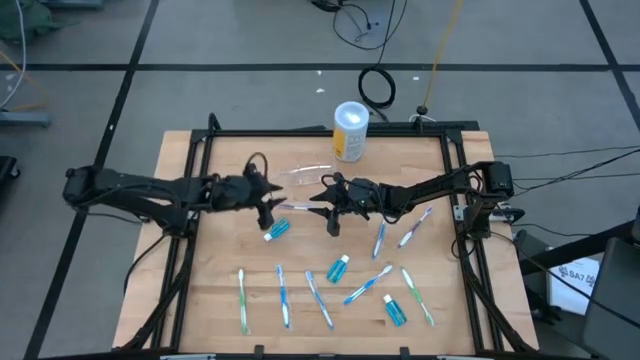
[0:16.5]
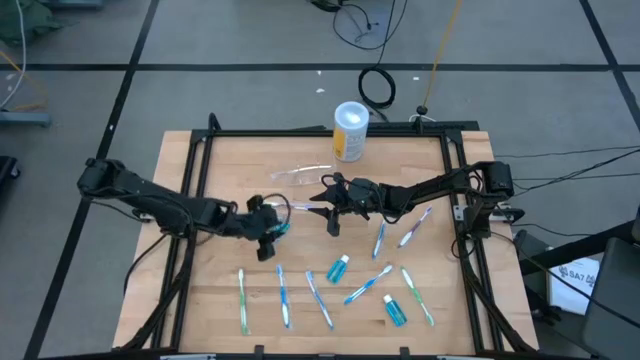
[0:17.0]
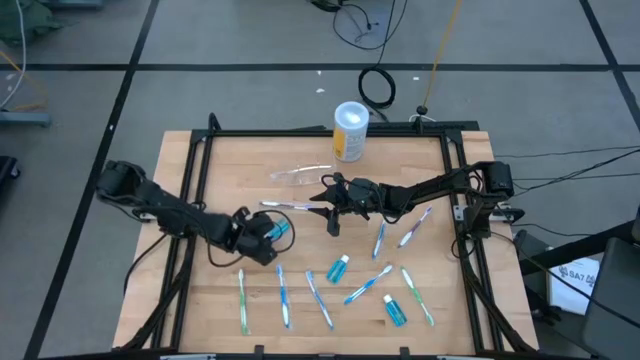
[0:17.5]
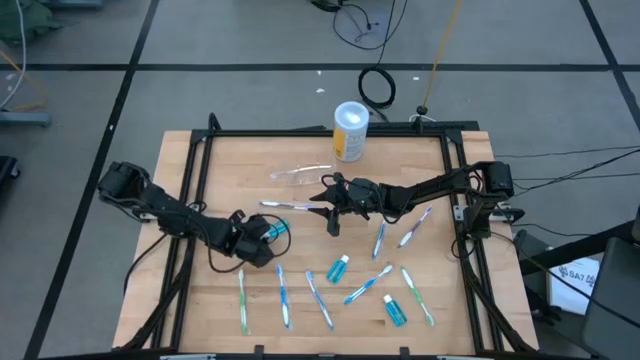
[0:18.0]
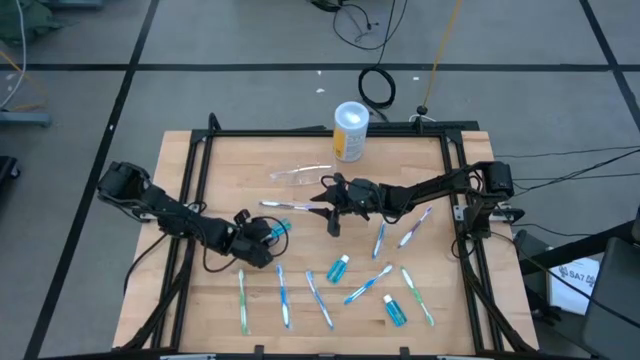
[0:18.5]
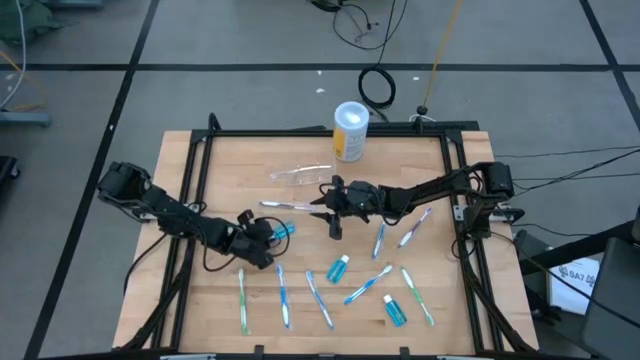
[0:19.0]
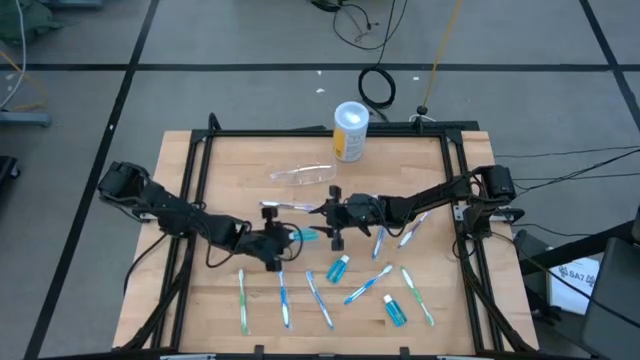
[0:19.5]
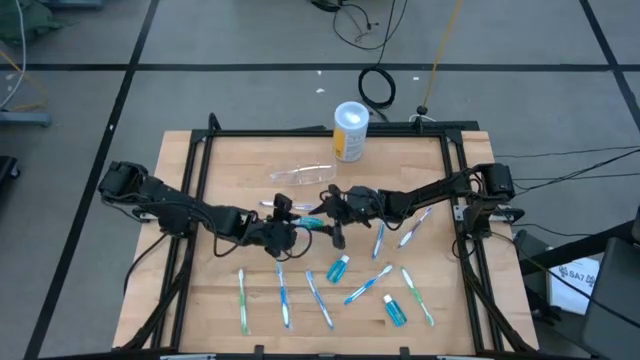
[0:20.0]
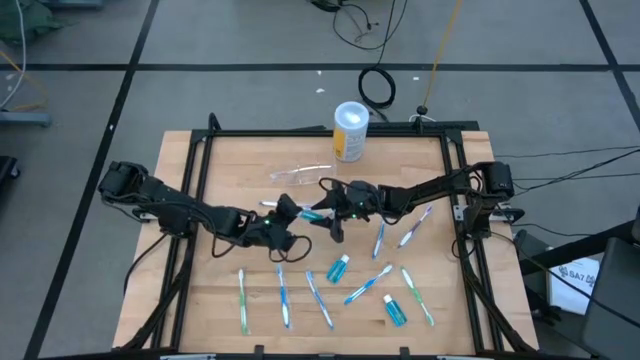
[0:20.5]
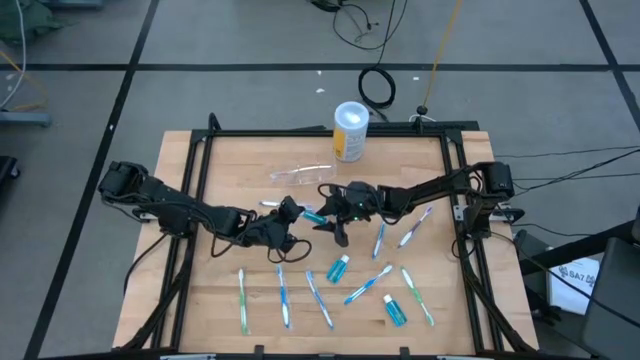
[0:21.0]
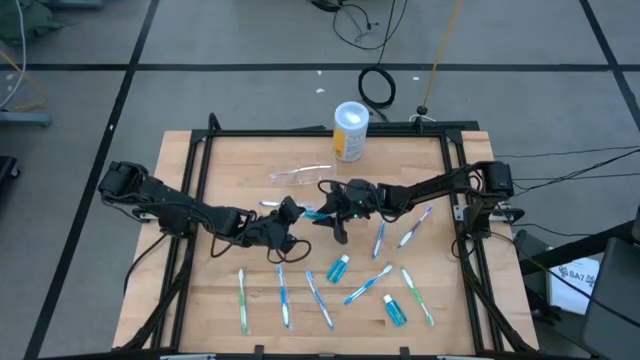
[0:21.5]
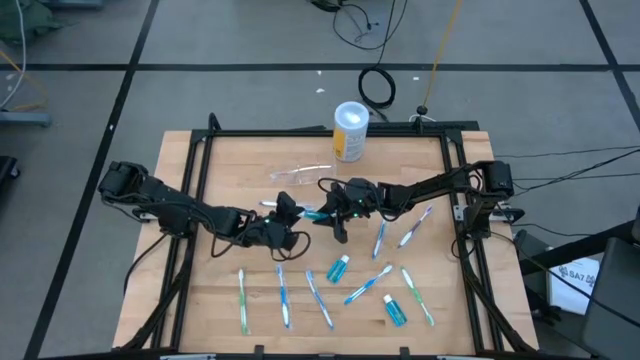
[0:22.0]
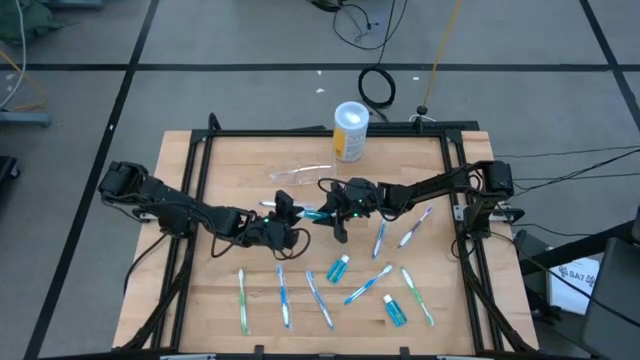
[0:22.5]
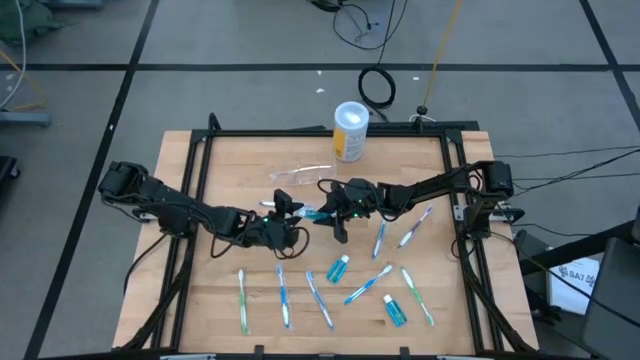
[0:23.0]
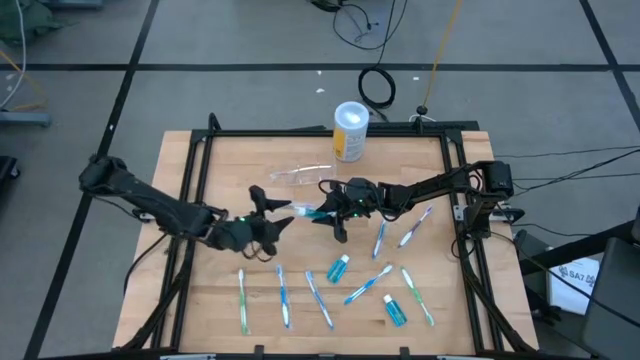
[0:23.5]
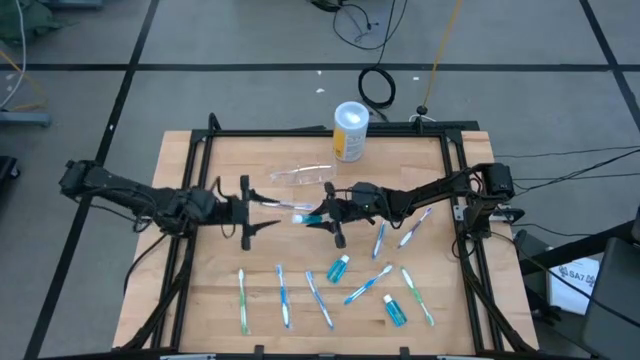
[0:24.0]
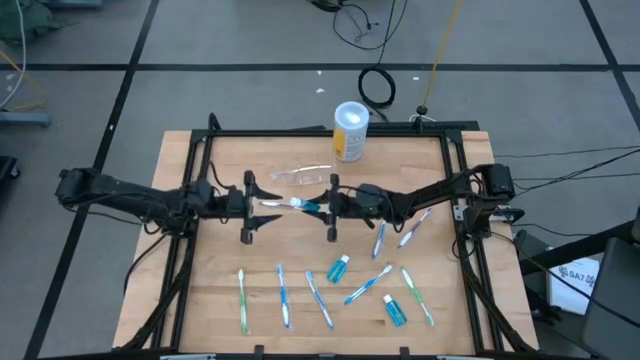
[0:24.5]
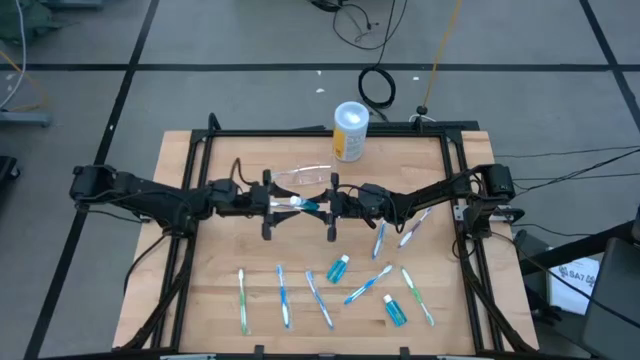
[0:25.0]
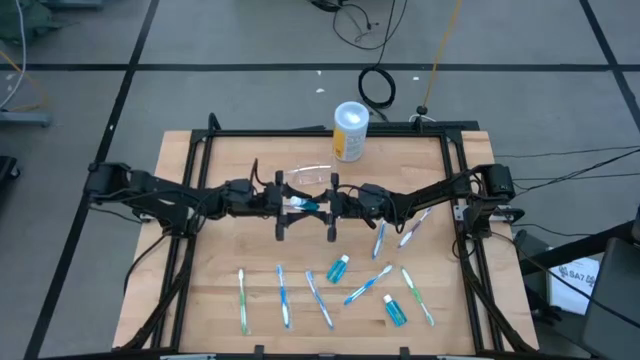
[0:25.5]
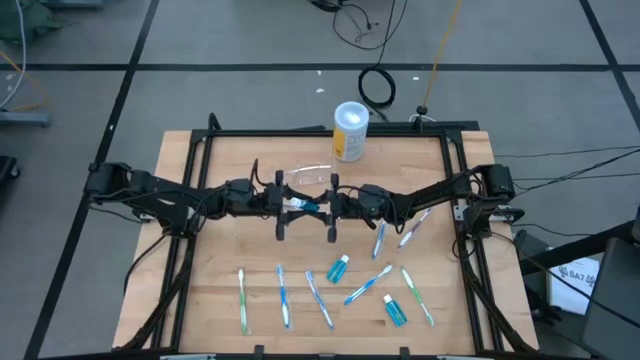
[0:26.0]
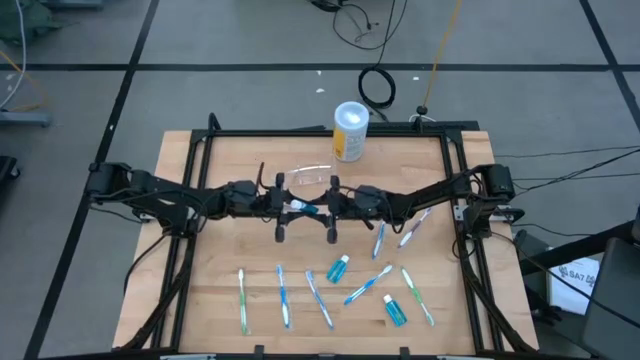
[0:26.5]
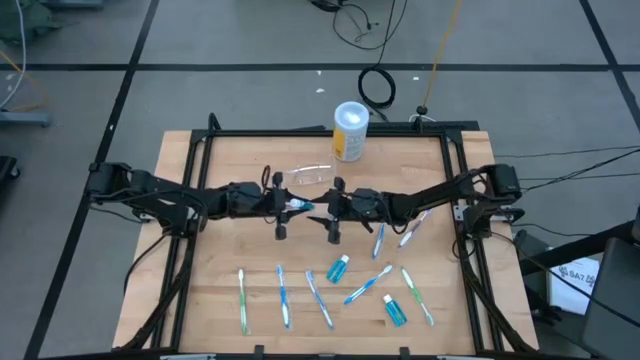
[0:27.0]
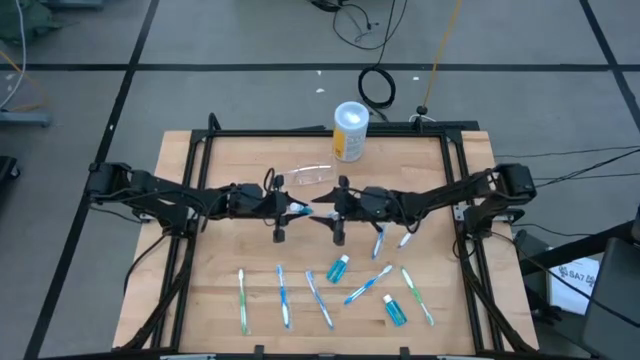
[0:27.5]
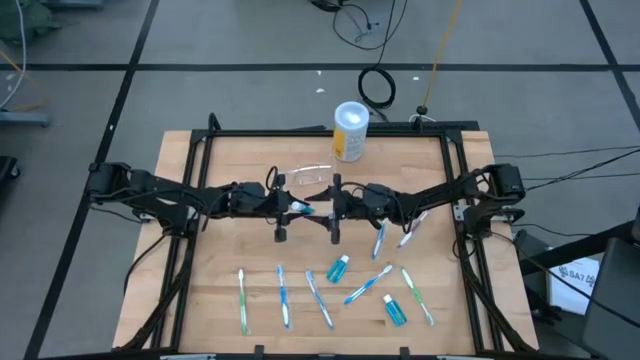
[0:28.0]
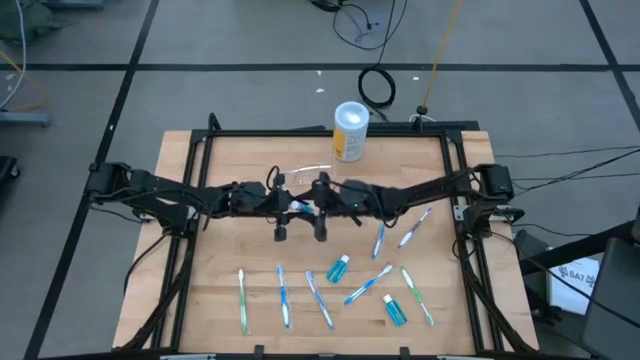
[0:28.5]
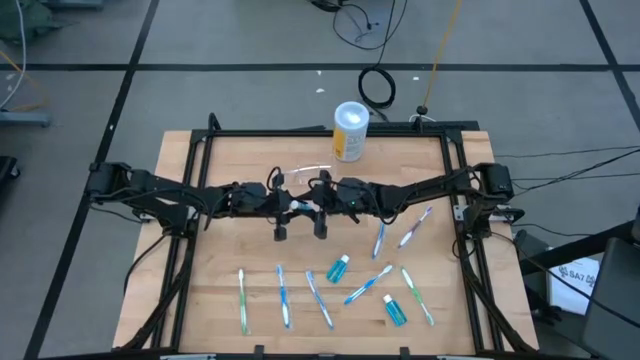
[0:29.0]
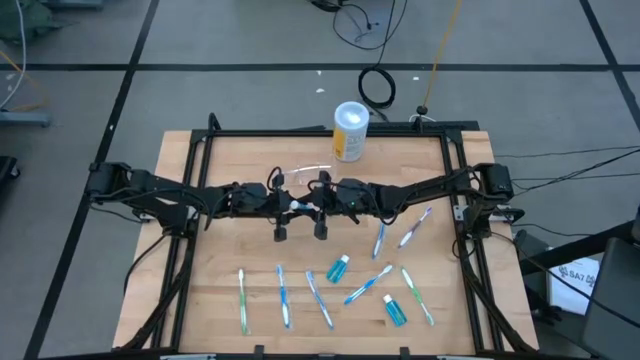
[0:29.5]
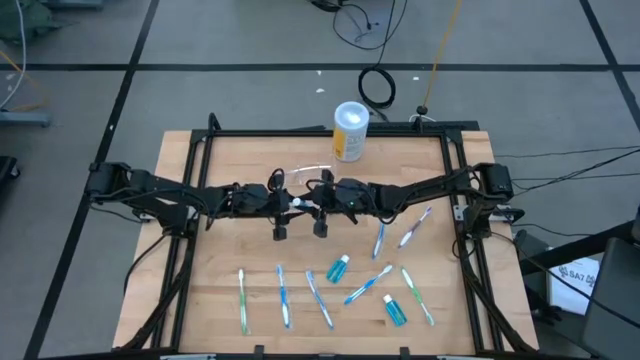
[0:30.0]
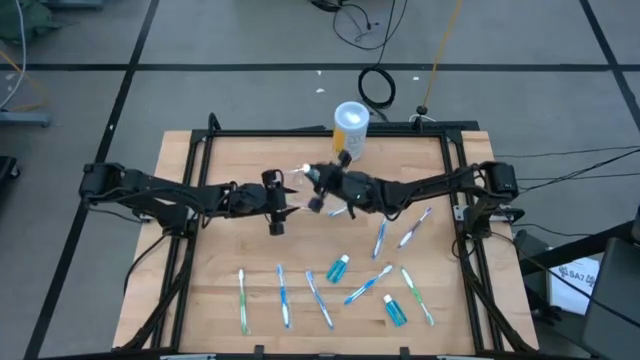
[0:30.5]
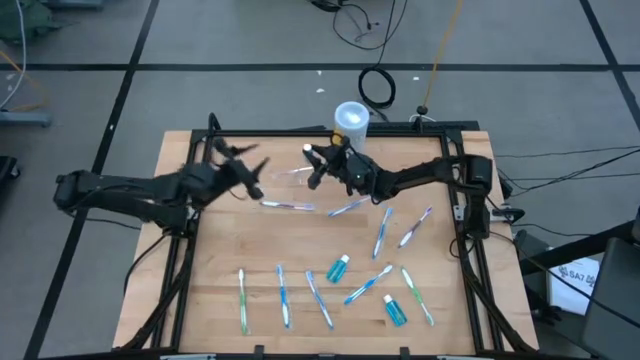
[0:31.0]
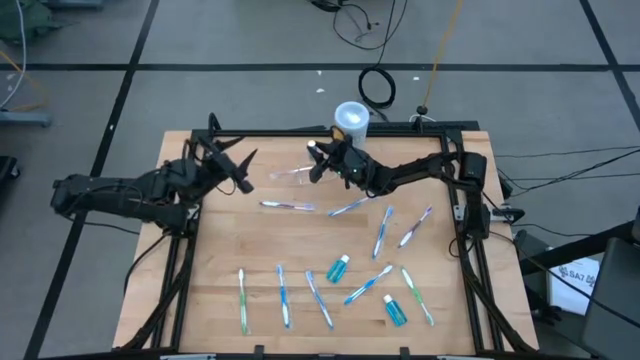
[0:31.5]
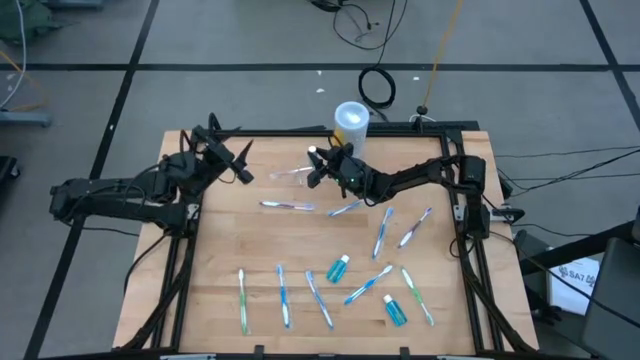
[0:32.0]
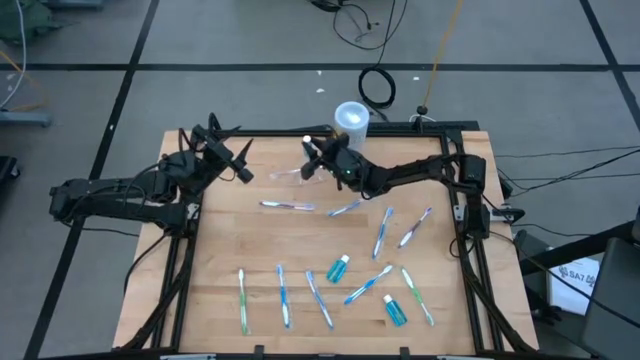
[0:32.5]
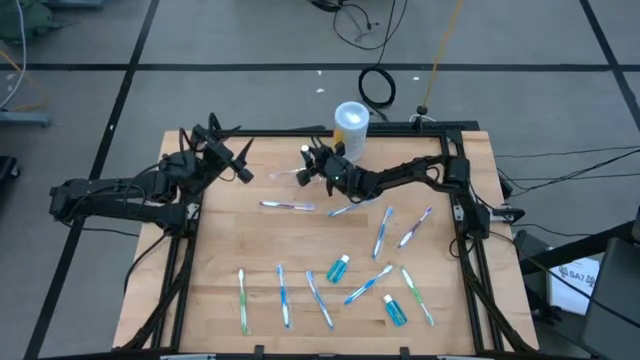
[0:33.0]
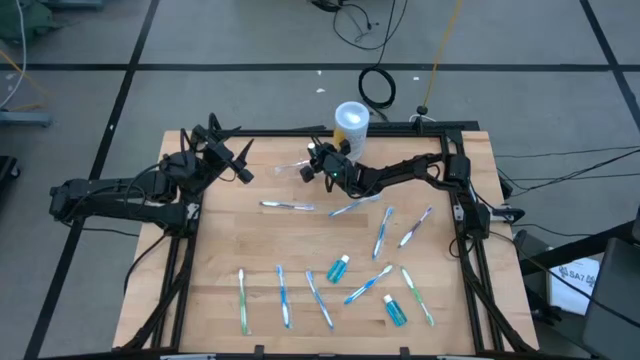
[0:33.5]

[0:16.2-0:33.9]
Task: Pick & Place toothbrushing station
Put the top blue mouthwash into the middle section of the transparent organizer

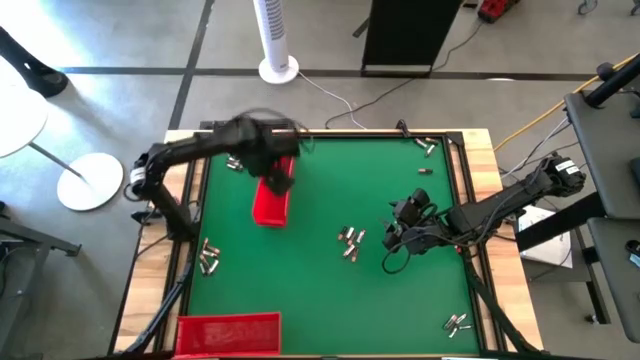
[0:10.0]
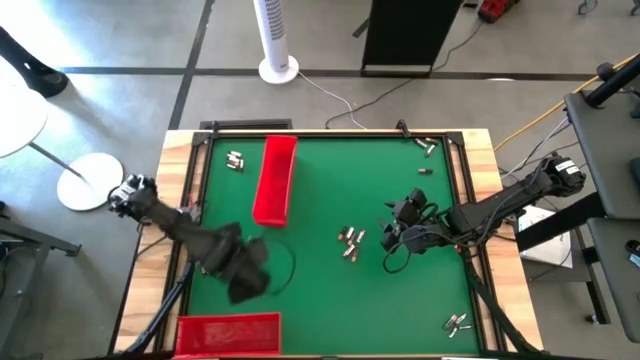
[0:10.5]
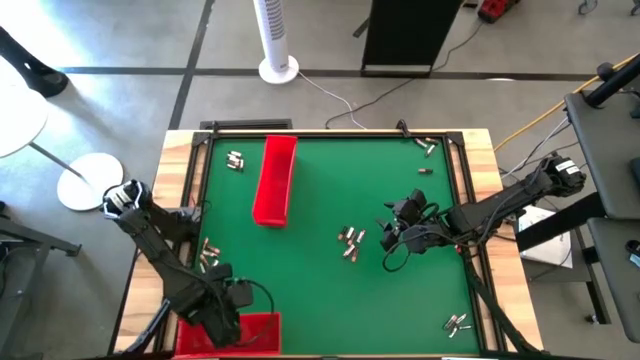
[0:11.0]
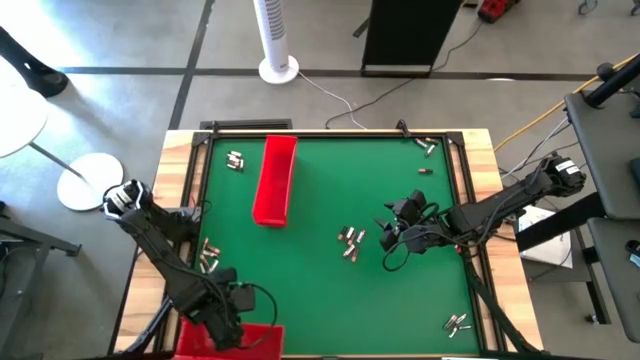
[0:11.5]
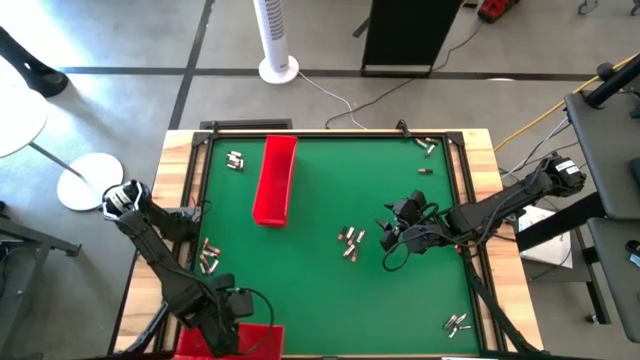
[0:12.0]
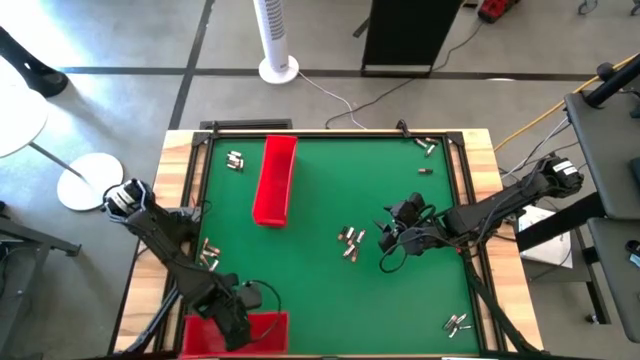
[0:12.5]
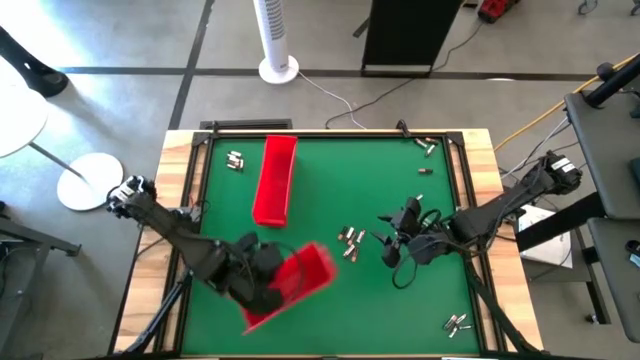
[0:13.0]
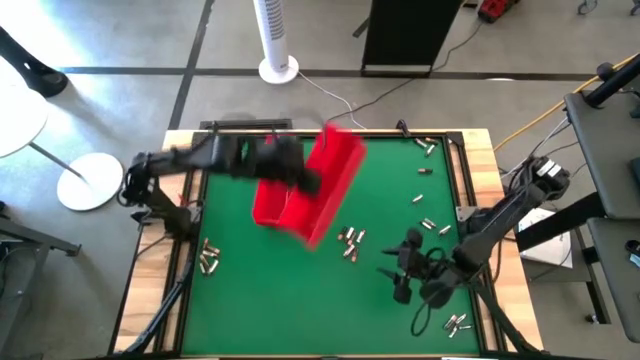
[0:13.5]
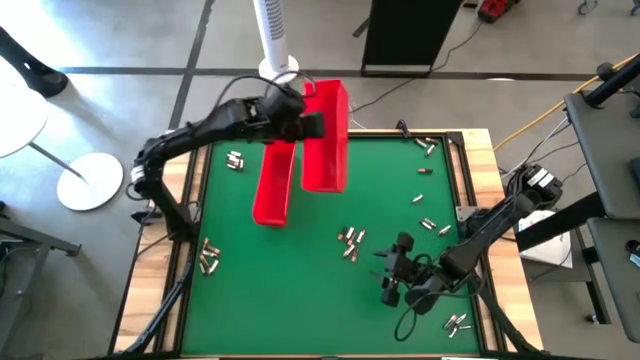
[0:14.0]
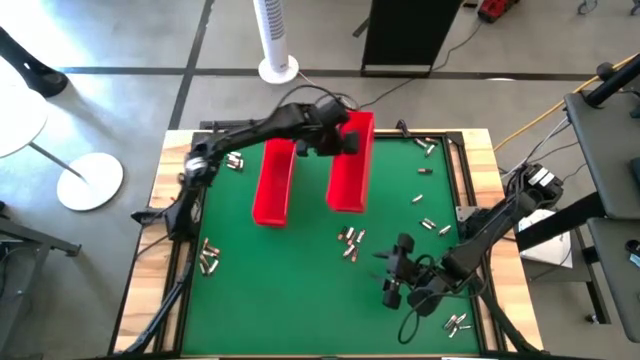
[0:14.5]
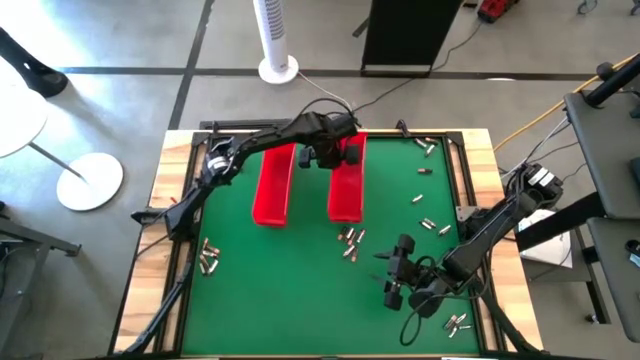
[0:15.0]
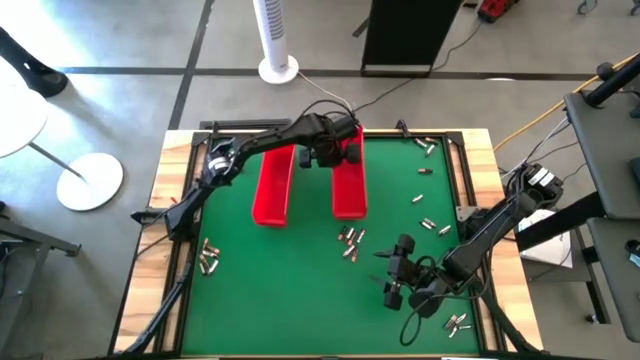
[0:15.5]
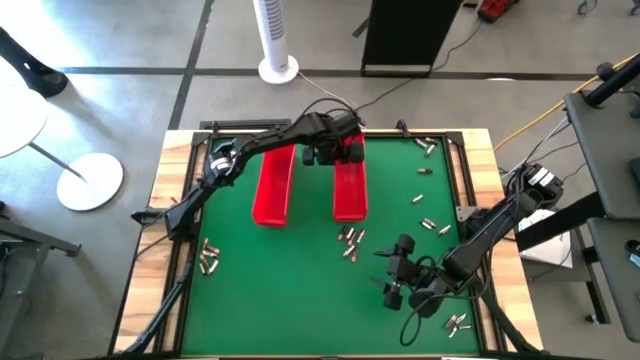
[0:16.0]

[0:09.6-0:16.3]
Task: Sort batteries
Move the red bin to the top right
